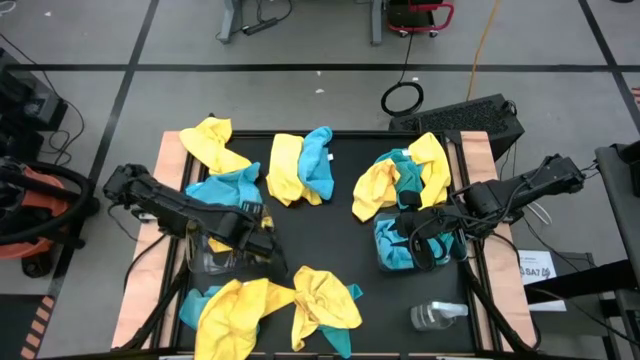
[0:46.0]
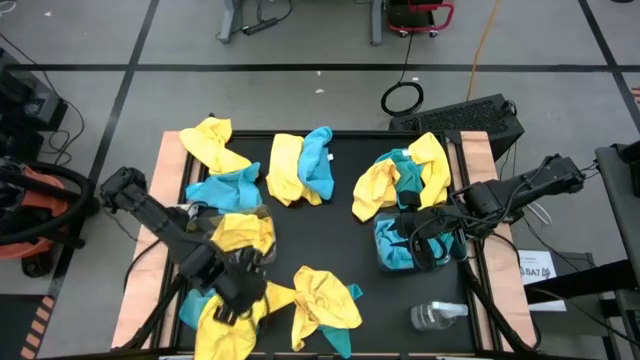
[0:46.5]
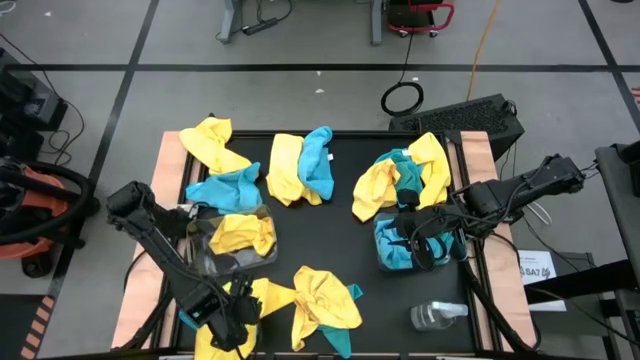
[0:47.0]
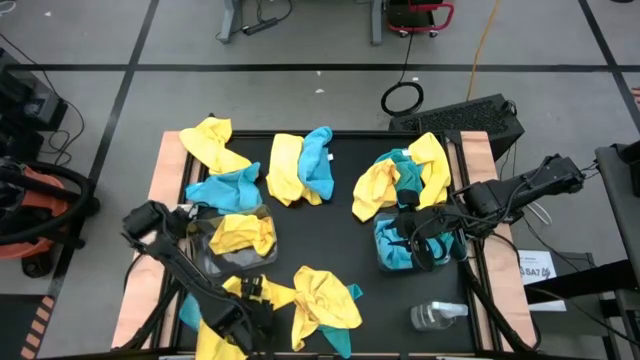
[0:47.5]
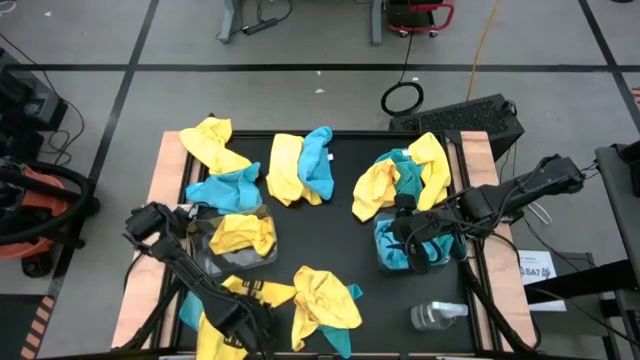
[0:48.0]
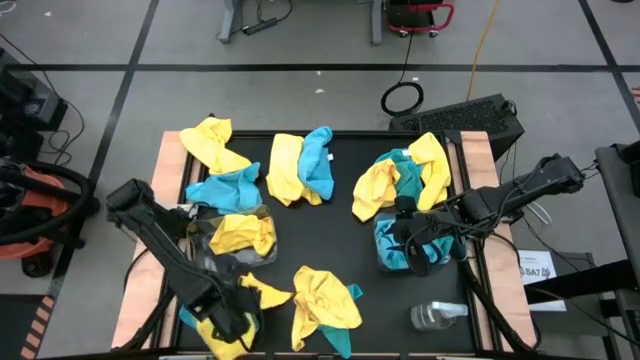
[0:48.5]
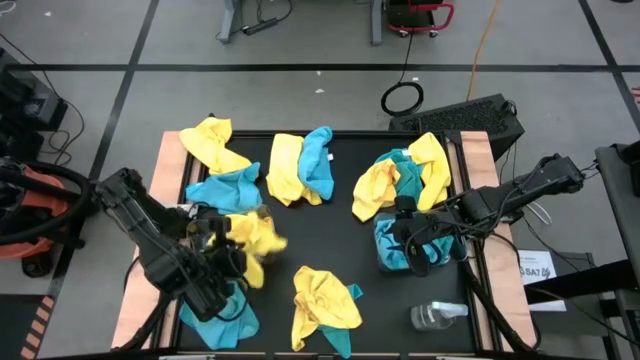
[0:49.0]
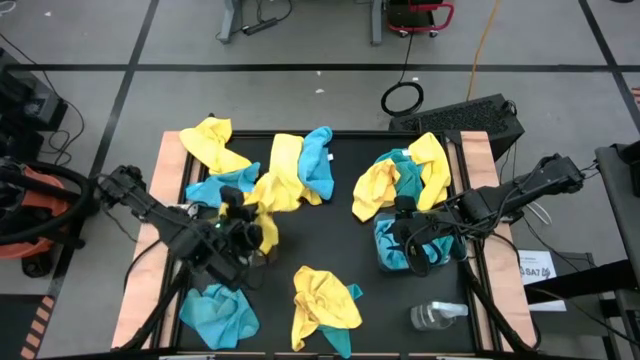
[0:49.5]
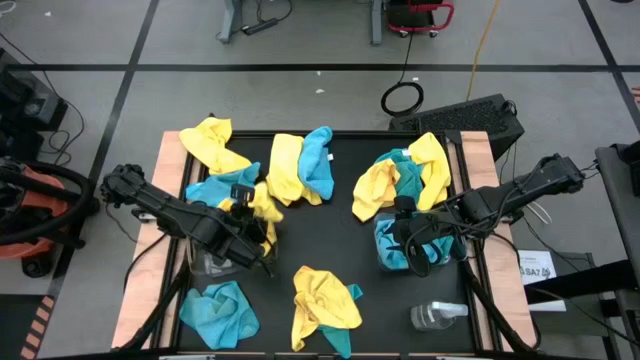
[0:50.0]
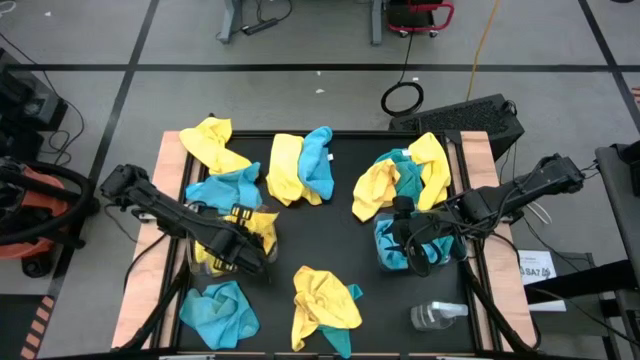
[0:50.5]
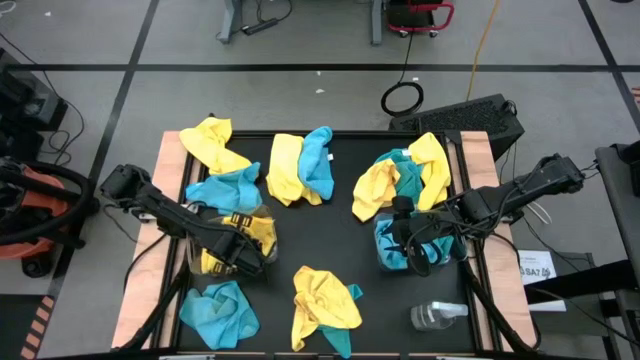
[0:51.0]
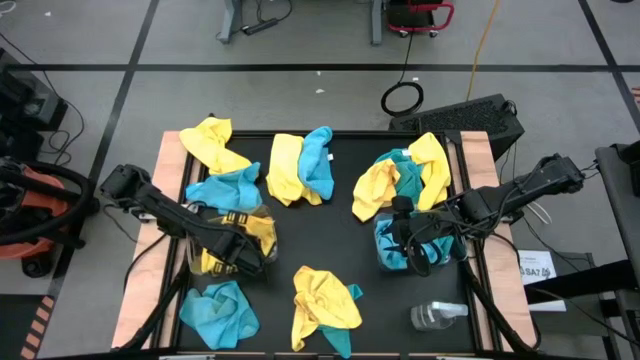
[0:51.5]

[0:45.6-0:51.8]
Task: Sort microfiber towel by color & place in baskets
Put the yellow microfiber towel into the left transparent bin

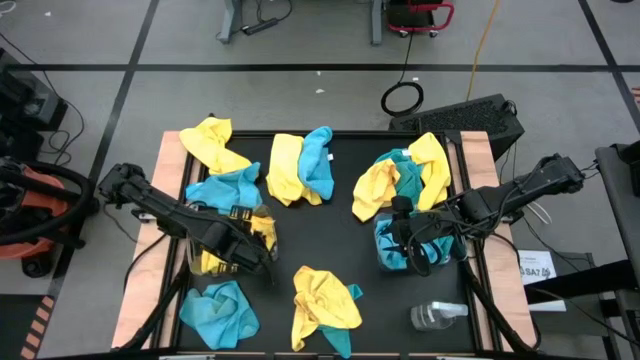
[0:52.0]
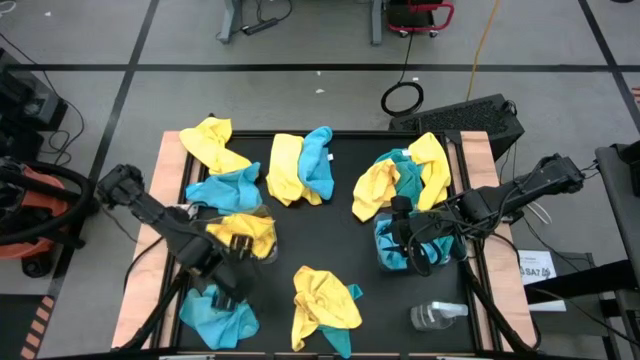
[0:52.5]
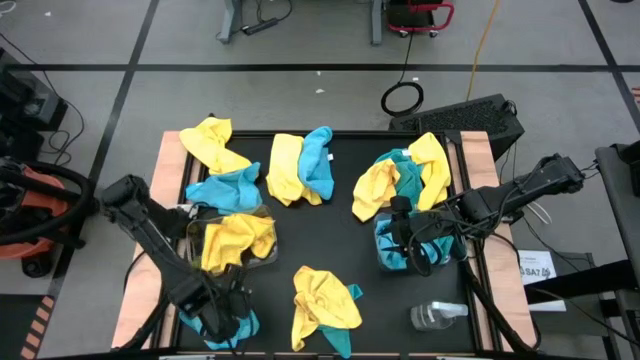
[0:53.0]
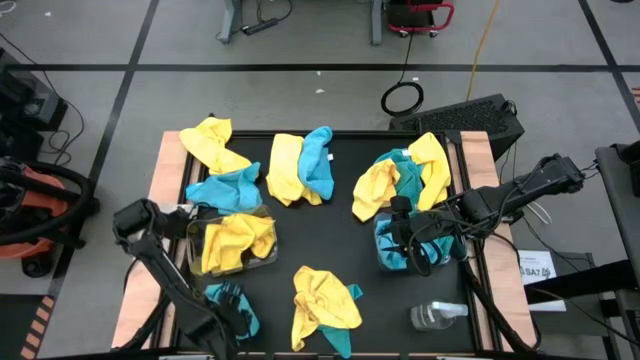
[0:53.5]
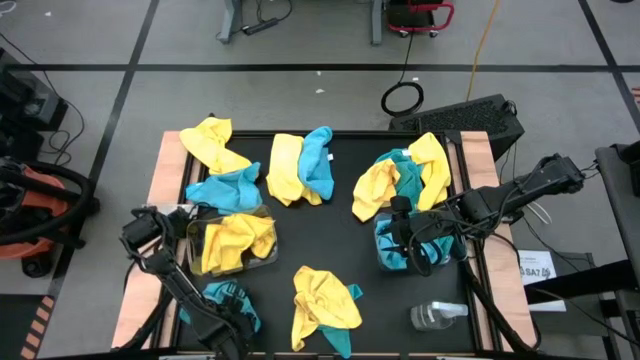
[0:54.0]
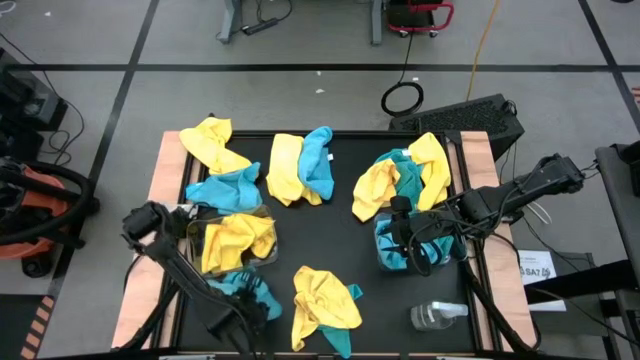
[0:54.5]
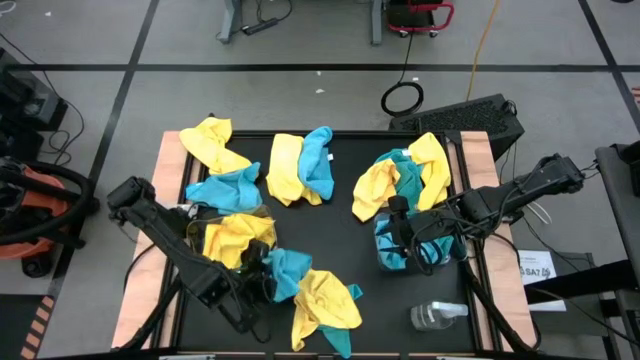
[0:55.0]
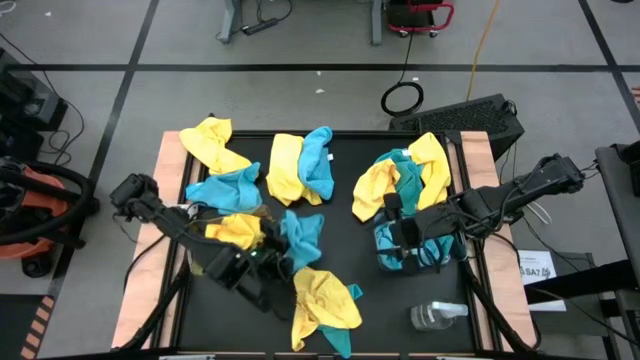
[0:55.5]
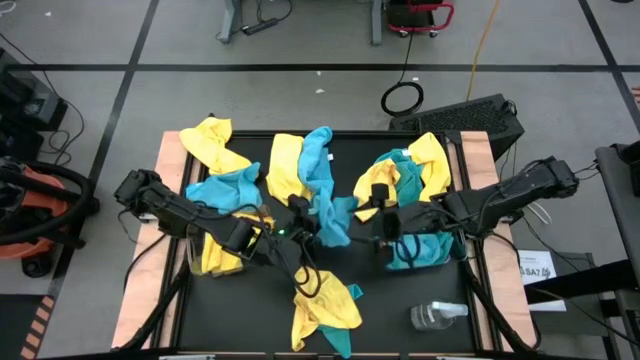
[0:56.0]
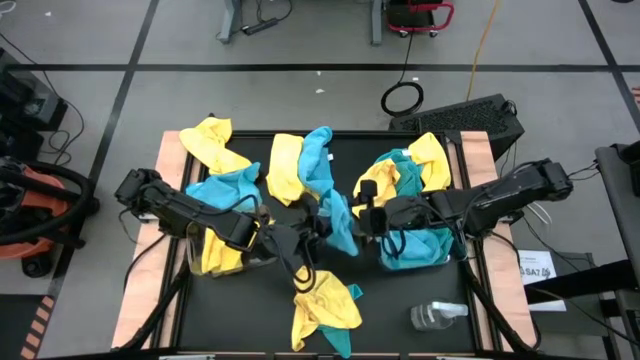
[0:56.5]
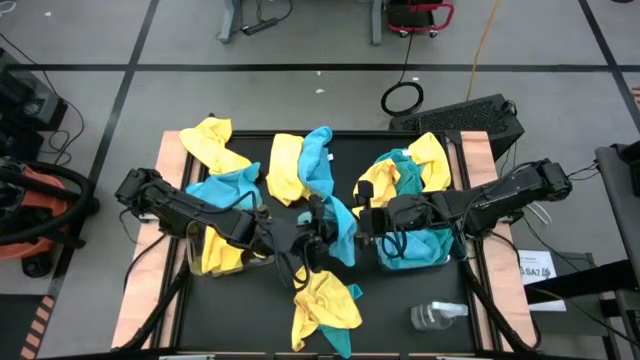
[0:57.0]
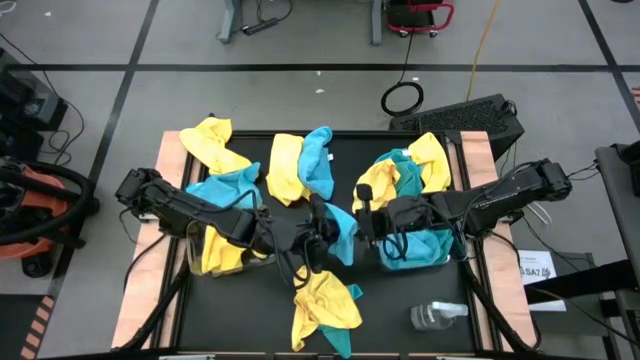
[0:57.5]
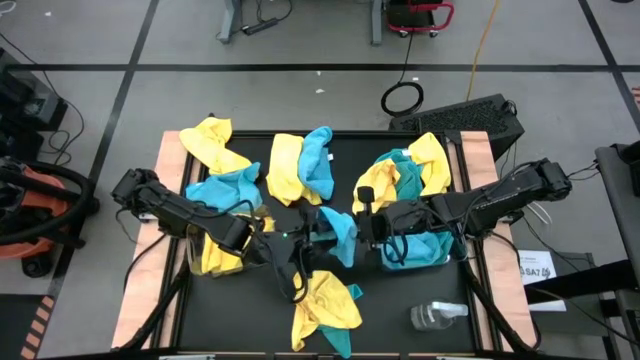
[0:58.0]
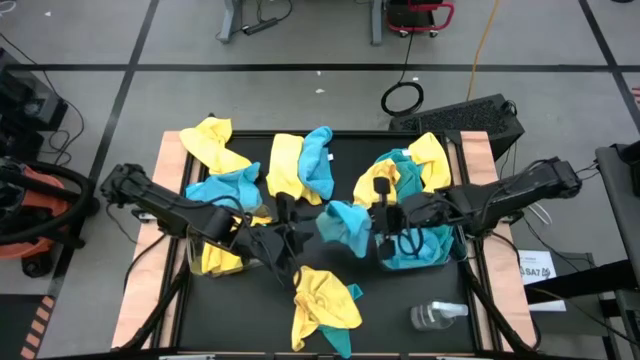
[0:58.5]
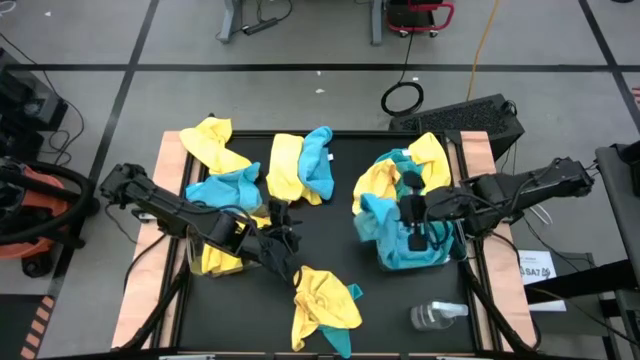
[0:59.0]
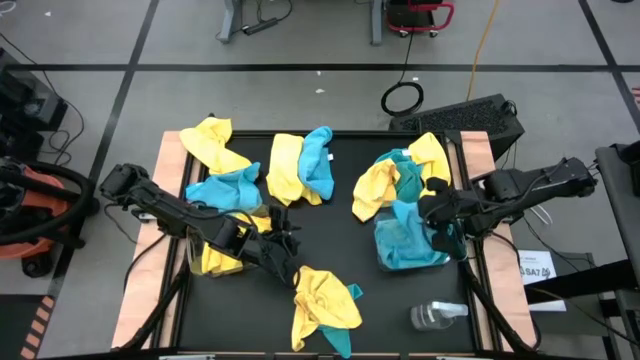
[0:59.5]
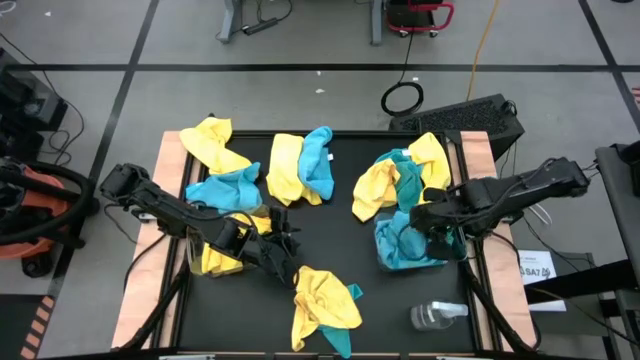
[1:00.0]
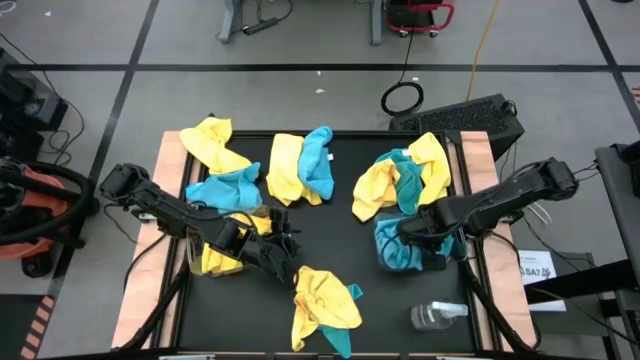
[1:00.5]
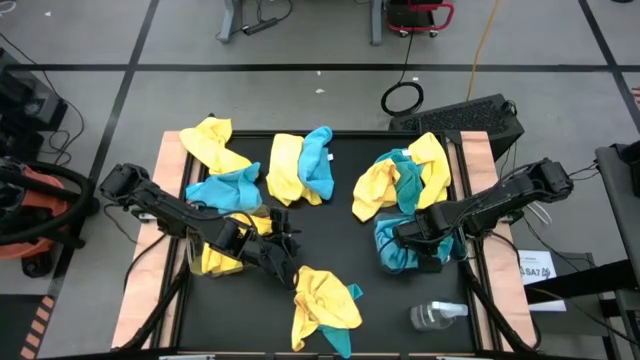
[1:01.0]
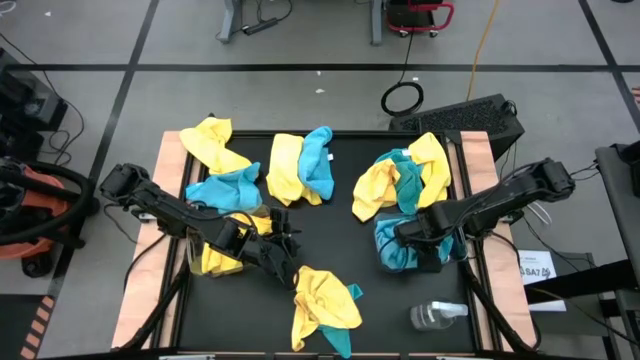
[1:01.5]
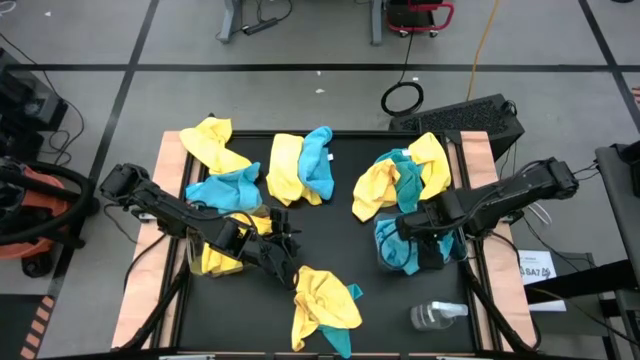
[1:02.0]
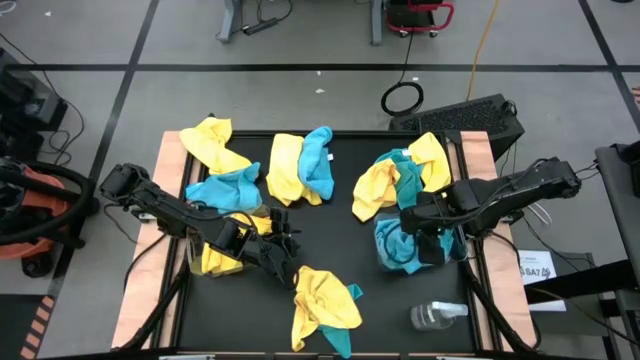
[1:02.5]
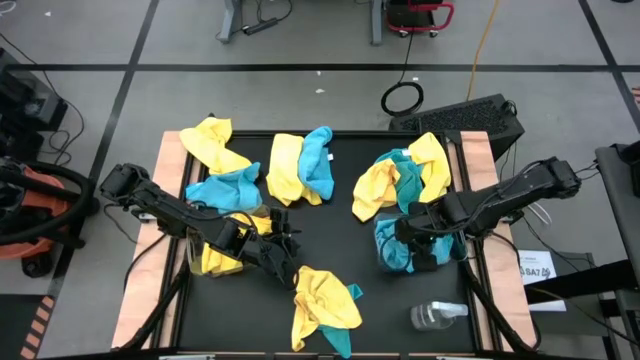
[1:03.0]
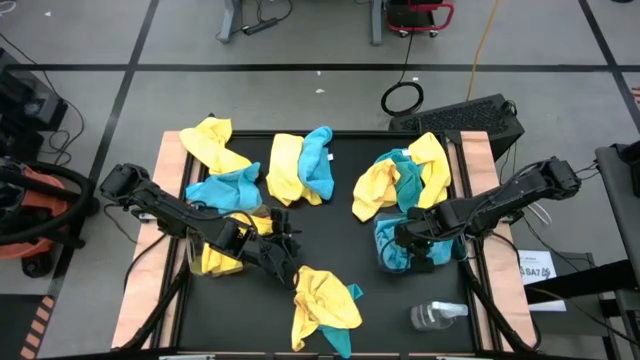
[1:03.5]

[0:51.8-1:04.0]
Put the blue microfiber towel into the right transparent bin

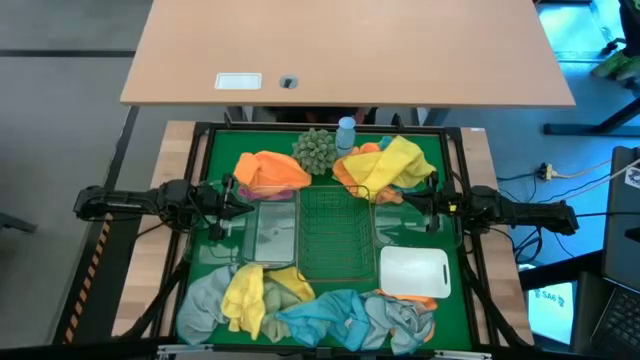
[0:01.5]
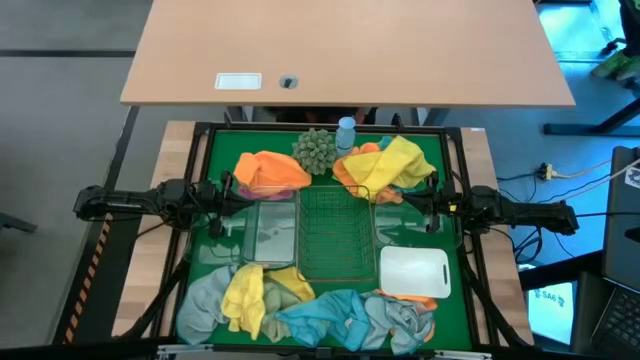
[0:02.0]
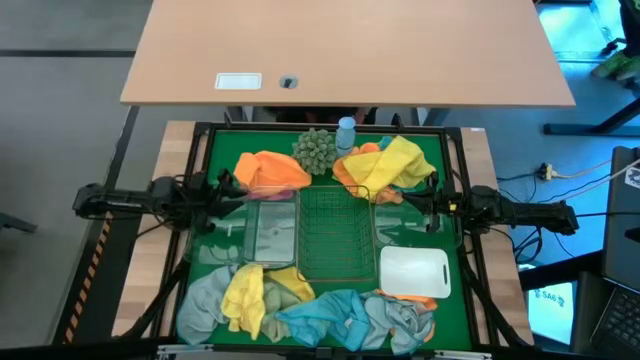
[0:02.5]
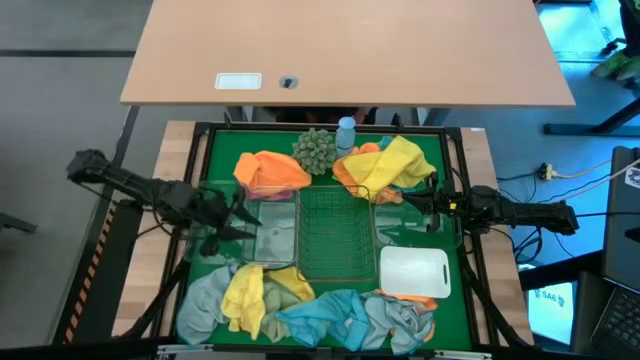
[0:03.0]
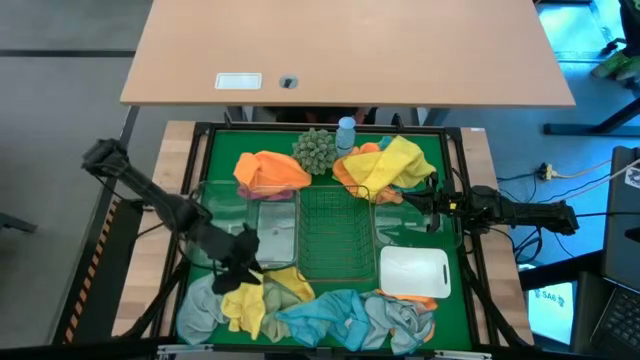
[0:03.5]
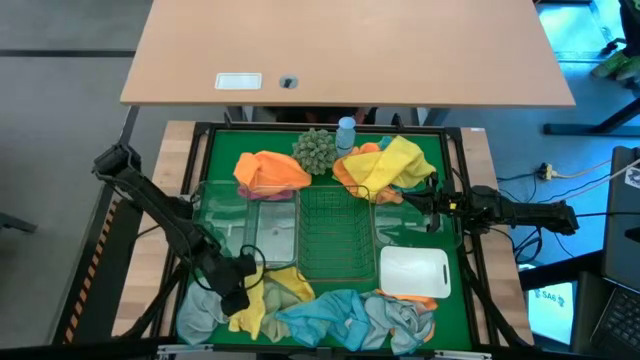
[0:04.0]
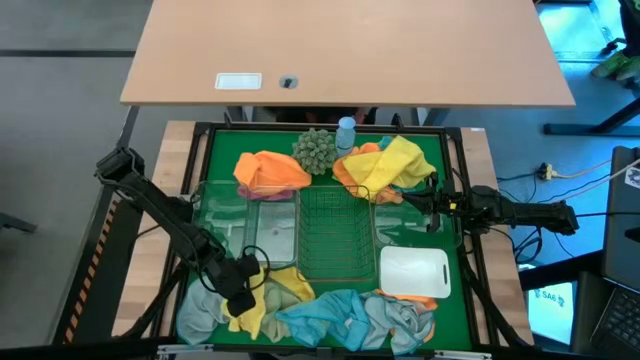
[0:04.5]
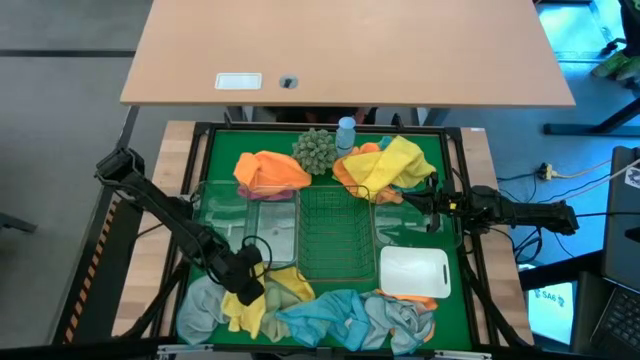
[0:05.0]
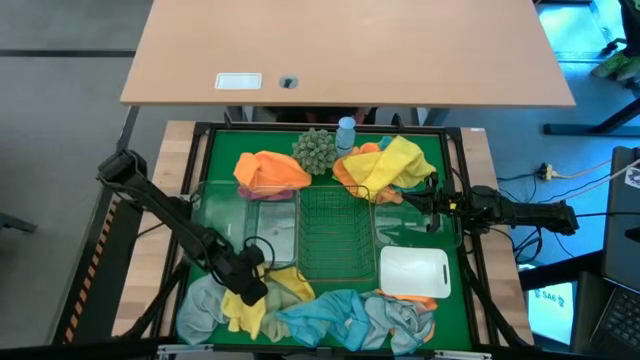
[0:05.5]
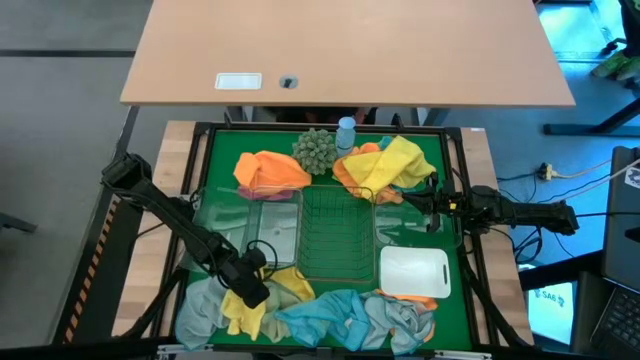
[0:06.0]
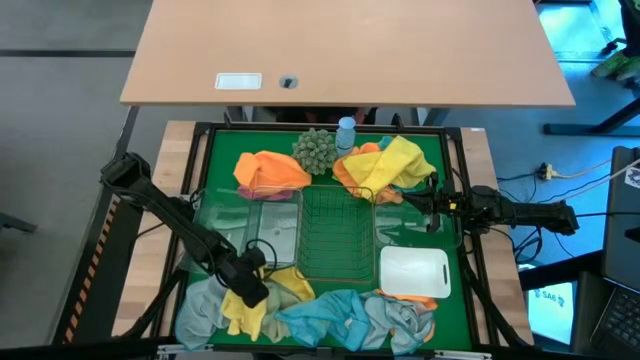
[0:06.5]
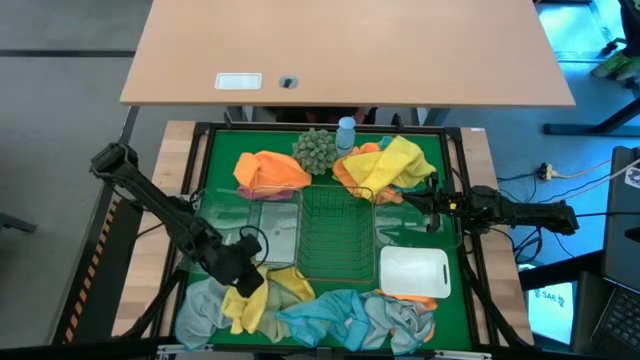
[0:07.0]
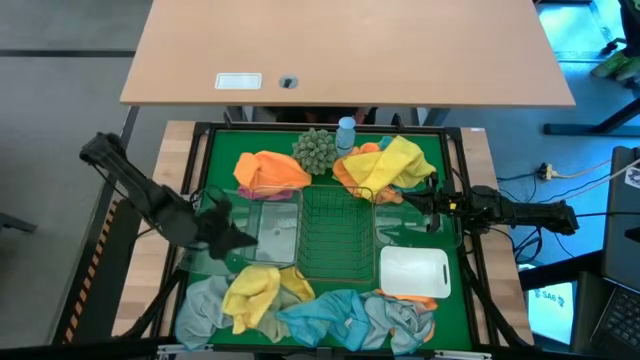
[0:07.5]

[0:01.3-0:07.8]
Task: Sort microfiber towel by color & place in baskets
Put the bottom left yellow microfiber cloth into the middle transparent bin
